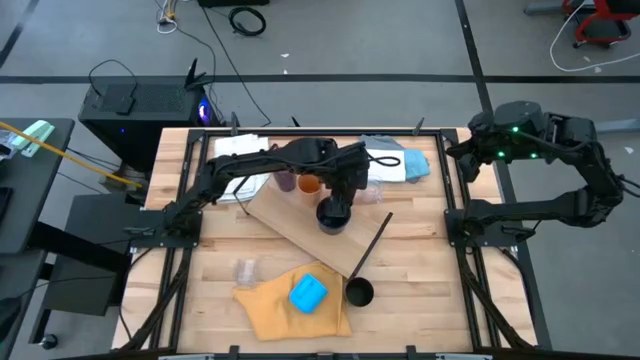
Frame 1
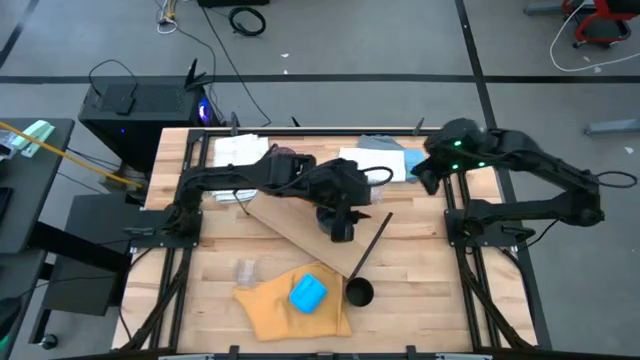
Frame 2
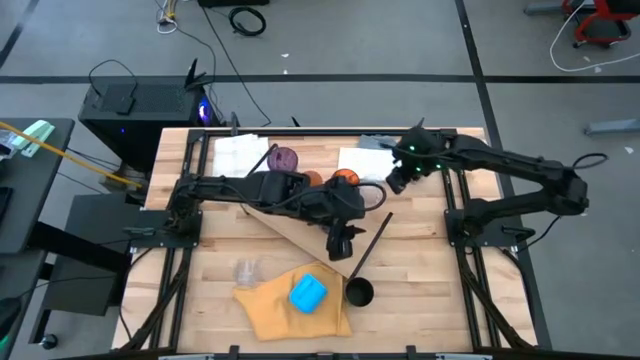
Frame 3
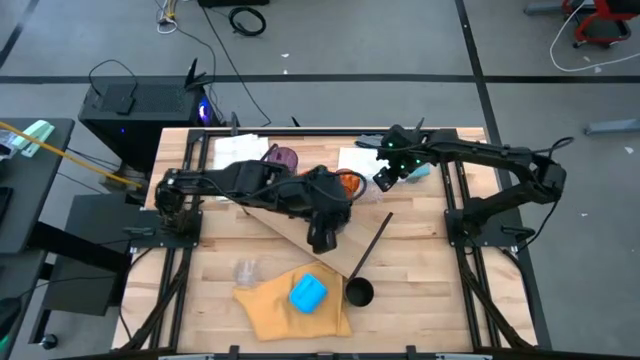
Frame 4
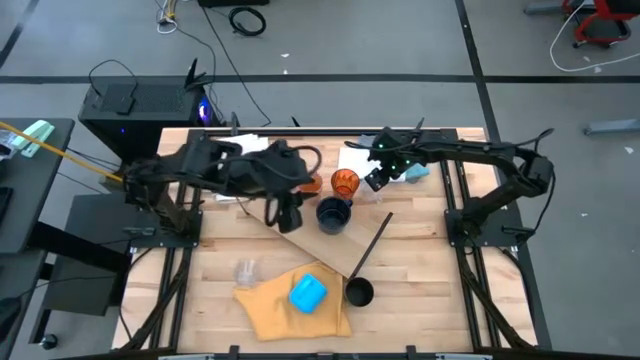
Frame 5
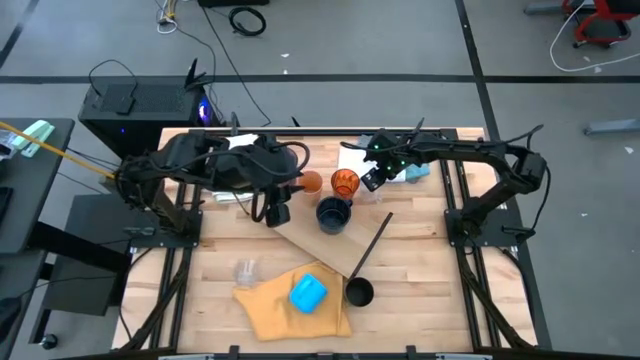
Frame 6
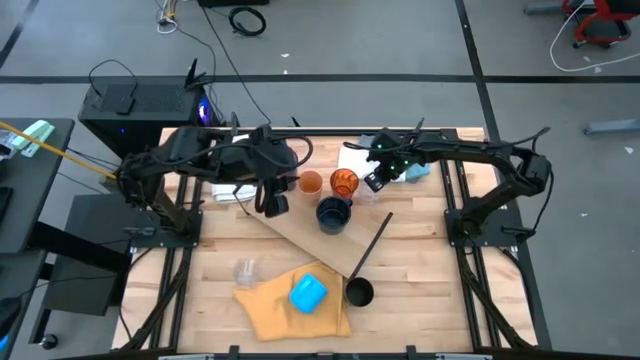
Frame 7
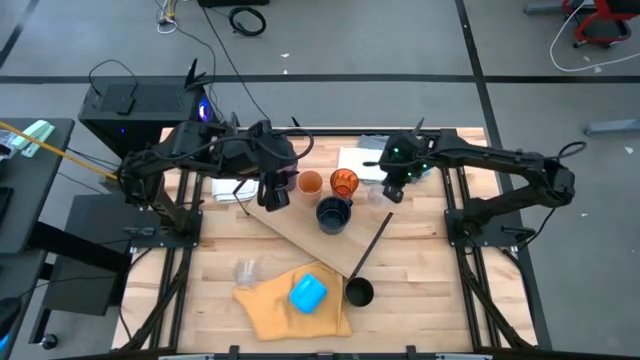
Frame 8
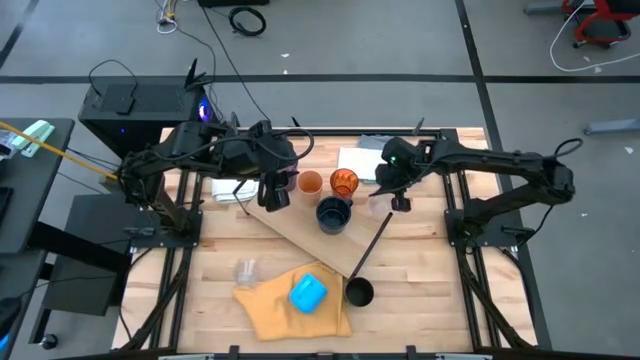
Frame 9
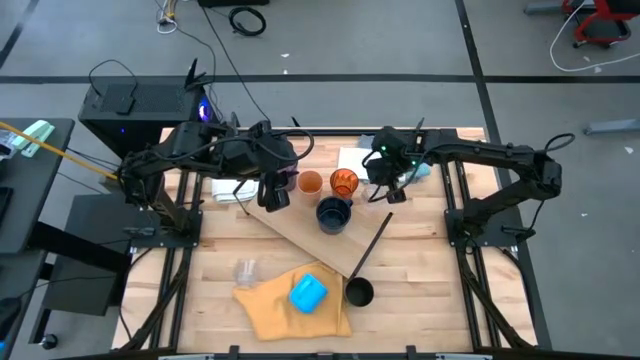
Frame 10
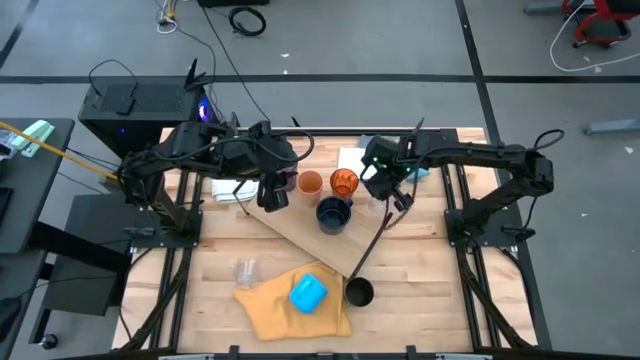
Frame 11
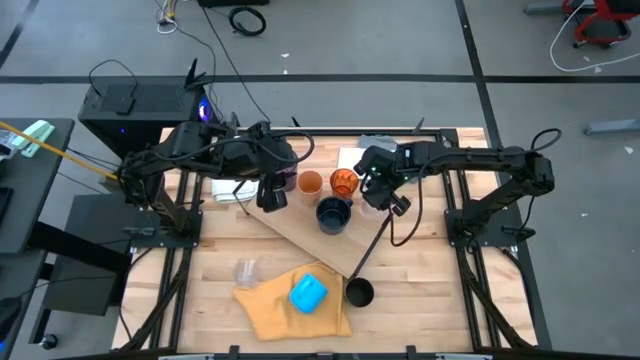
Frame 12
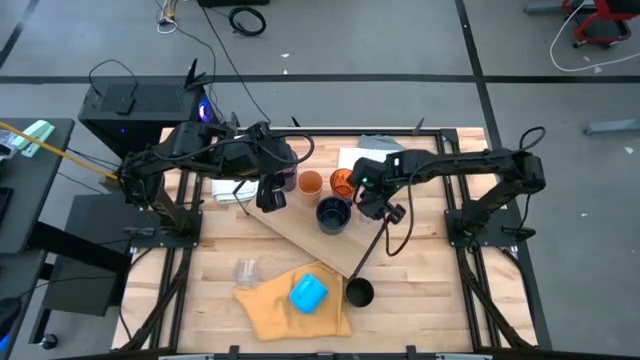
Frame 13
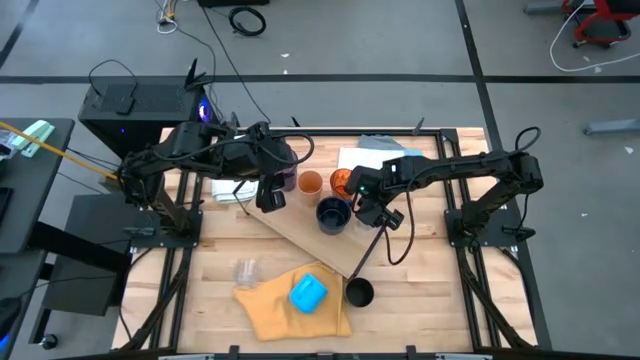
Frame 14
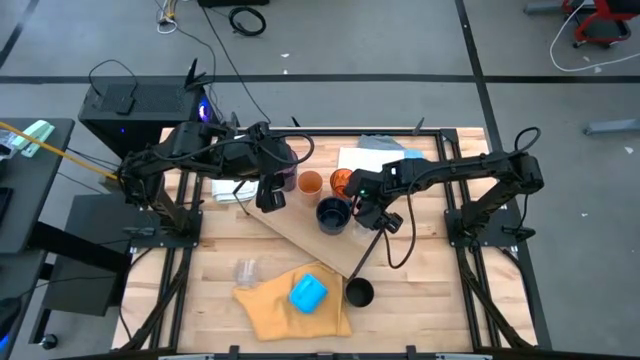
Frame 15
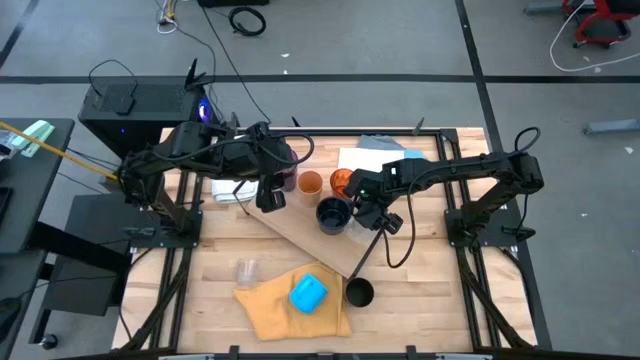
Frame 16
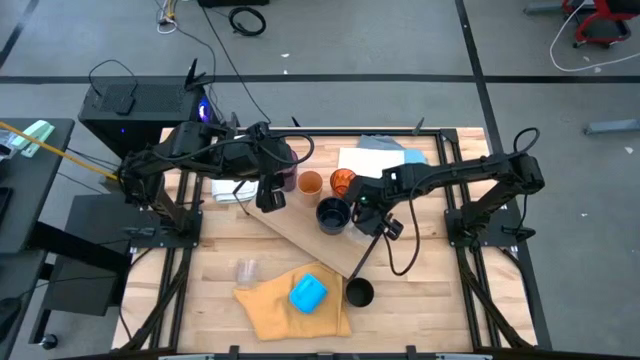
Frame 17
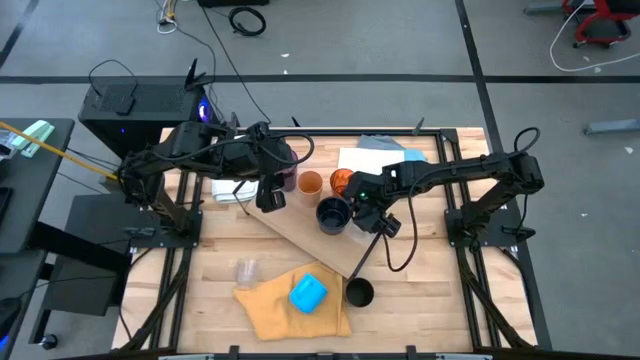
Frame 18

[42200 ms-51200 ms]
Task: Stack small to large cups/mugs on shelf
Put the transparent mug on the shelf

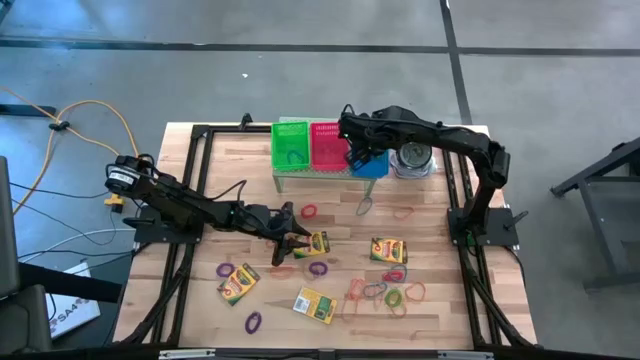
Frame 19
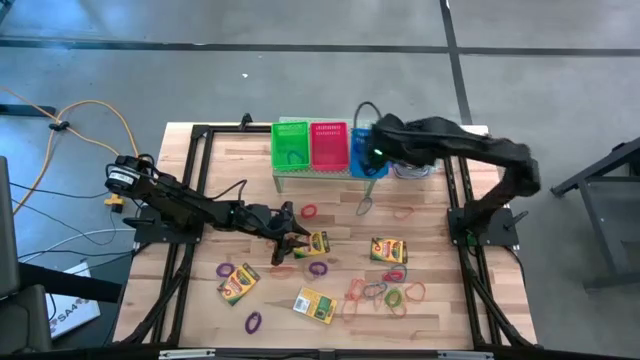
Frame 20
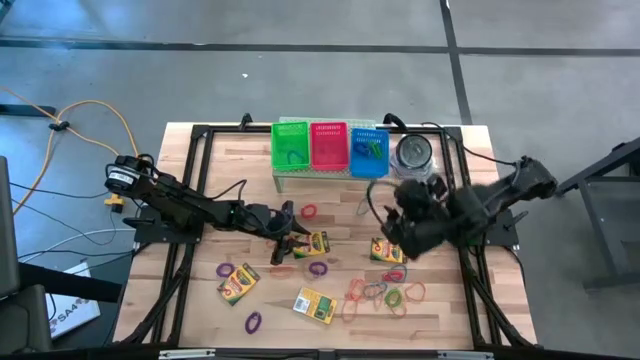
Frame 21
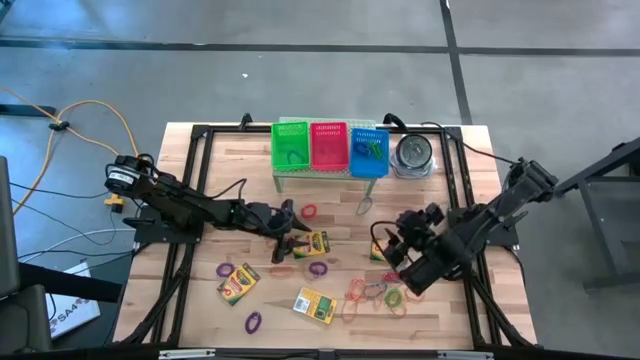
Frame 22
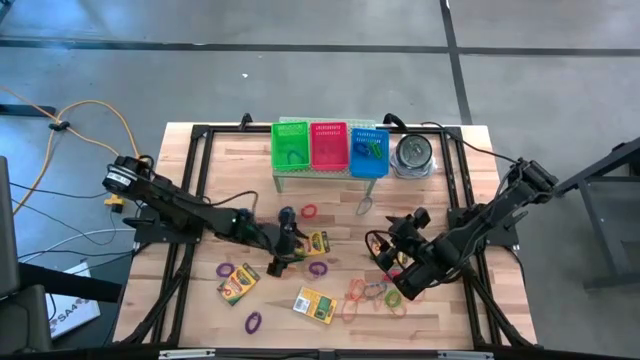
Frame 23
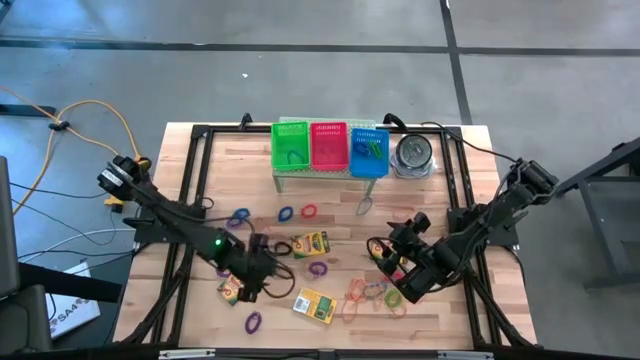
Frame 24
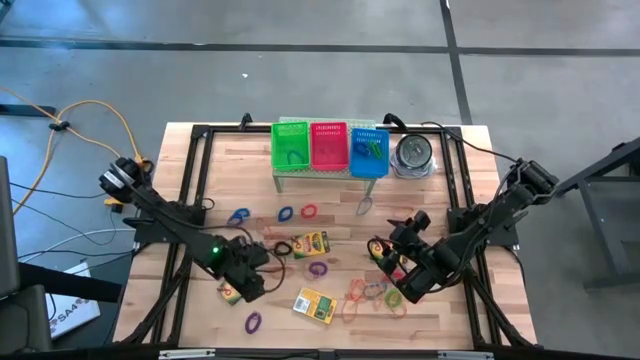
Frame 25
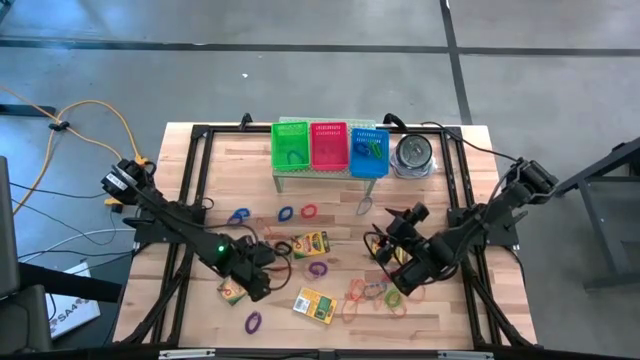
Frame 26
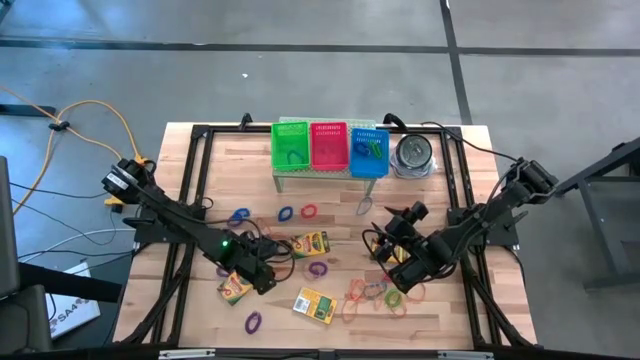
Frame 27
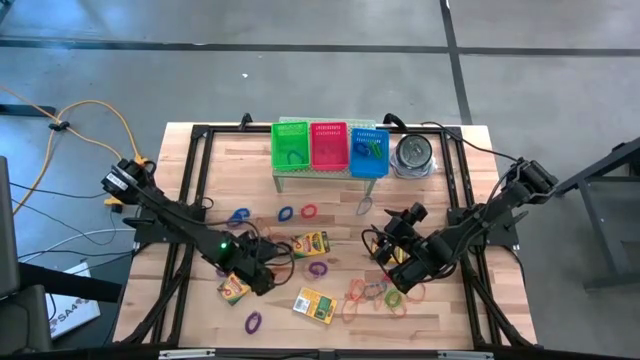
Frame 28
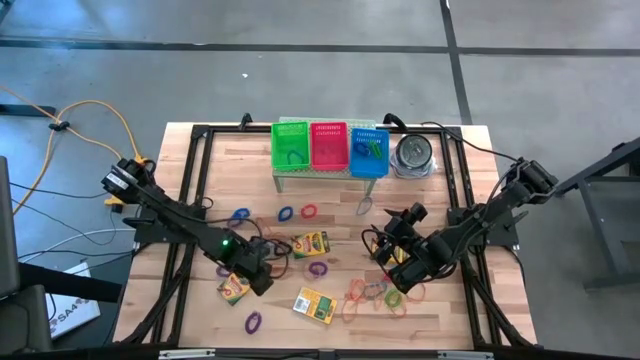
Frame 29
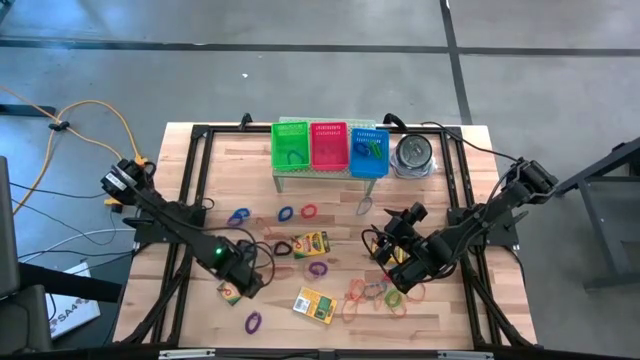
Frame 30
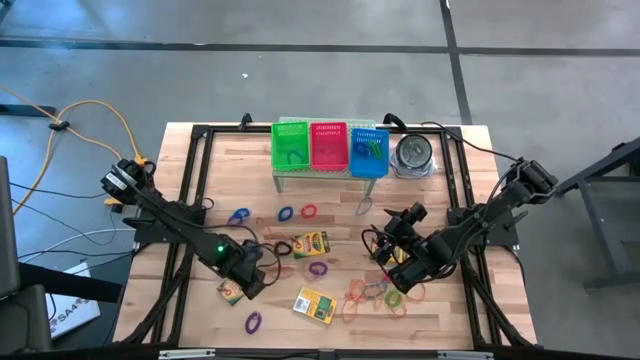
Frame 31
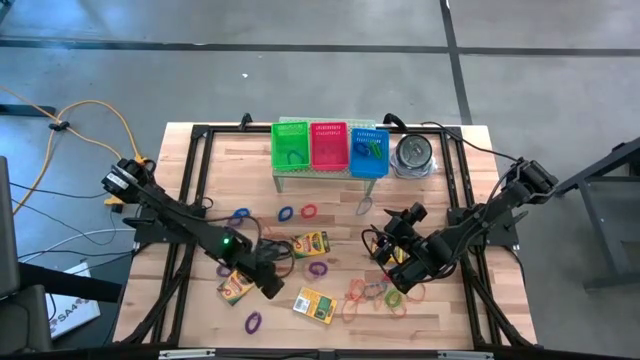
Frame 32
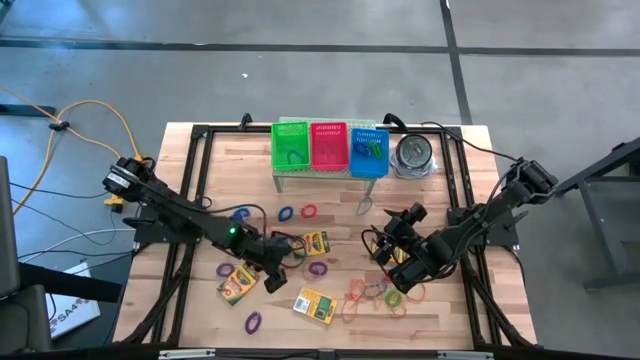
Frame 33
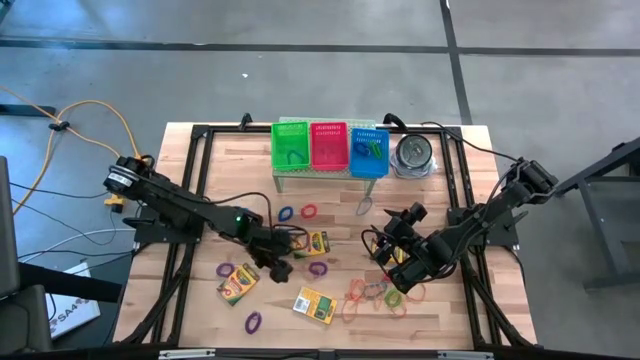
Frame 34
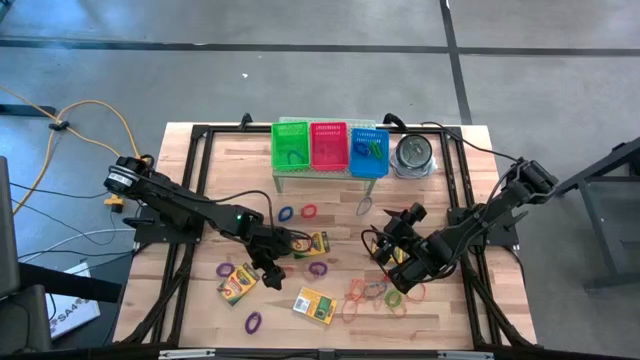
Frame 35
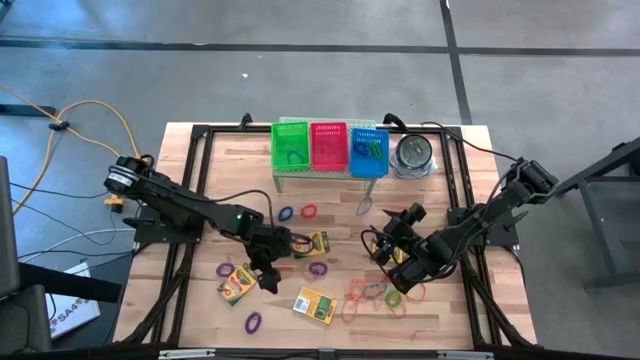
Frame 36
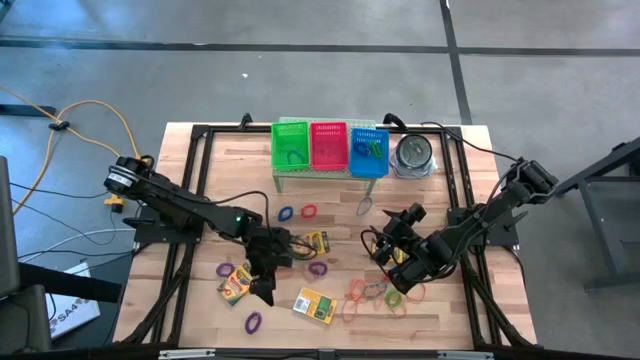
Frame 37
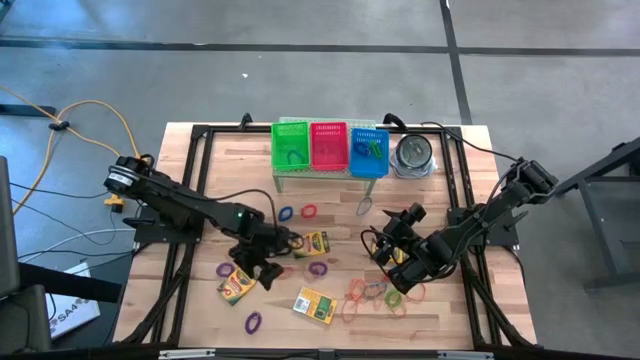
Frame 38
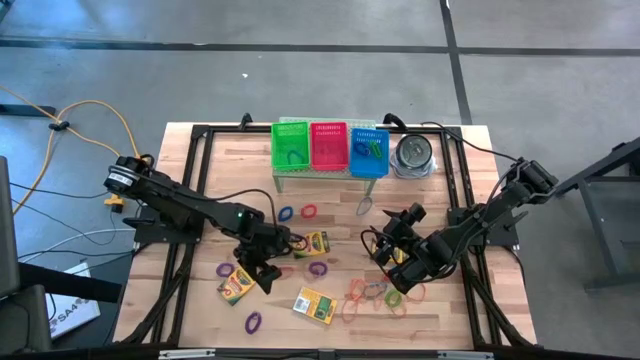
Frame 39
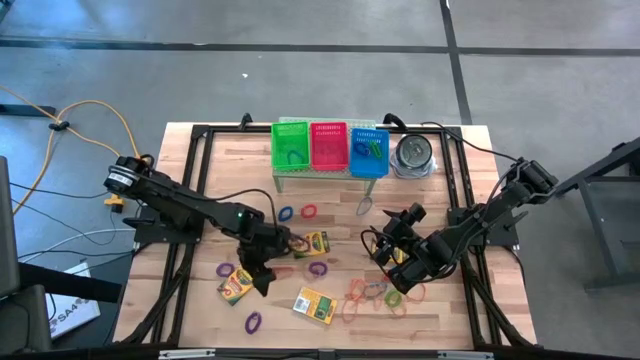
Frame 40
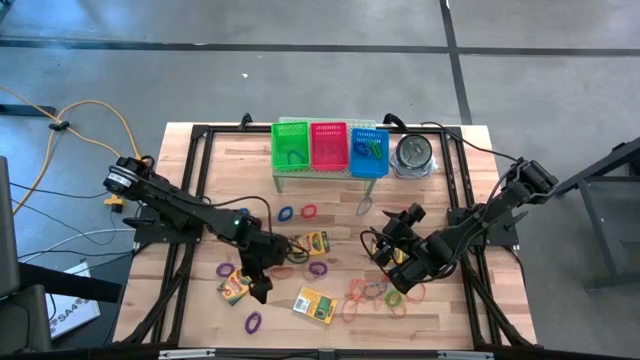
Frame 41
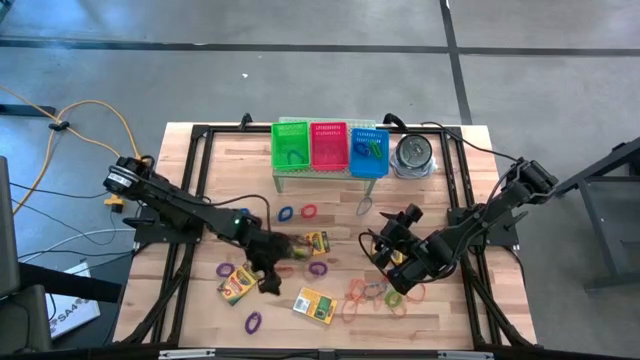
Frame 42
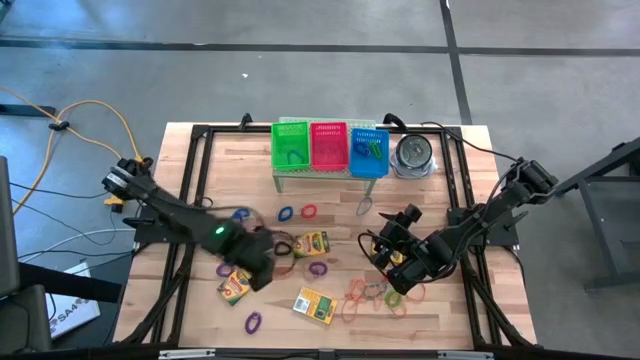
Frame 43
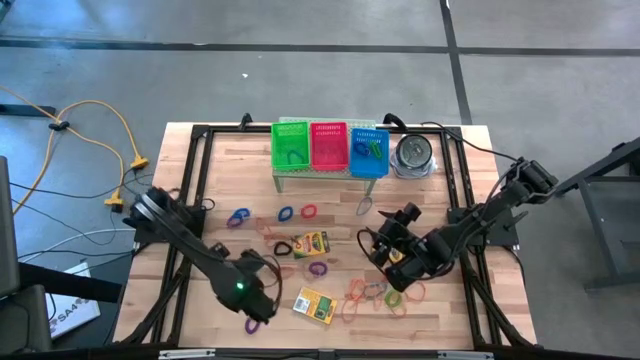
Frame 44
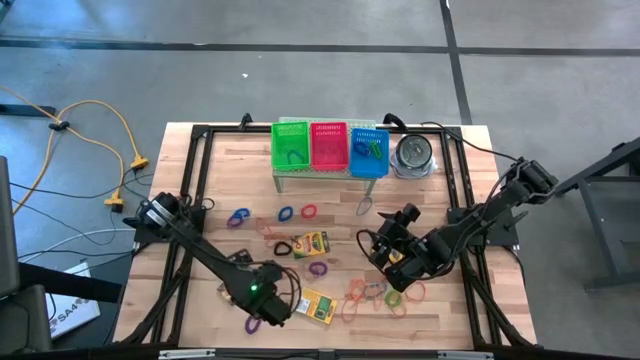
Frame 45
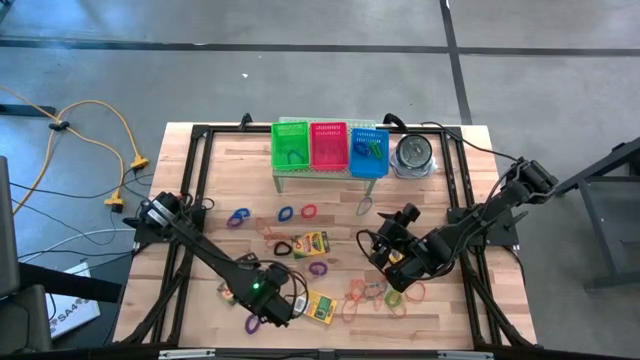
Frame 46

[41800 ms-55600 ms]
Task: Pick & Place Office Desk Supplies
Put the yellow crayon box into the red bin on the shelf
